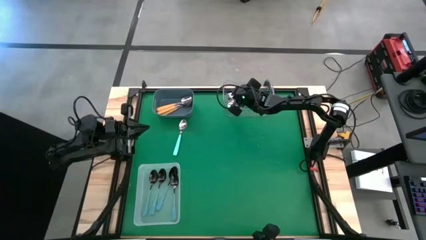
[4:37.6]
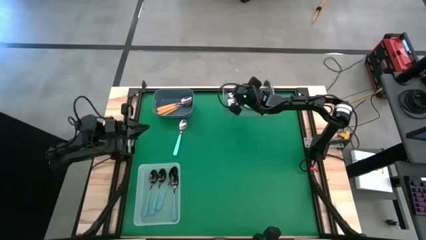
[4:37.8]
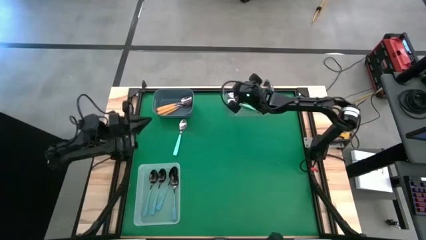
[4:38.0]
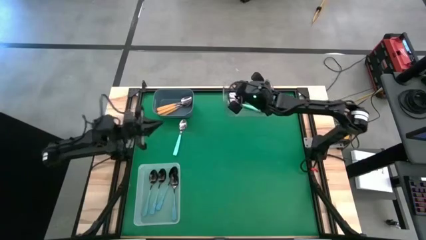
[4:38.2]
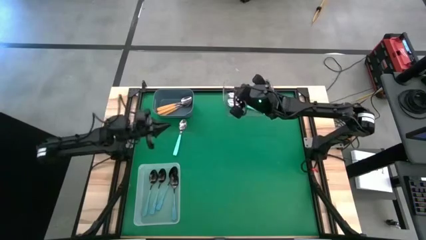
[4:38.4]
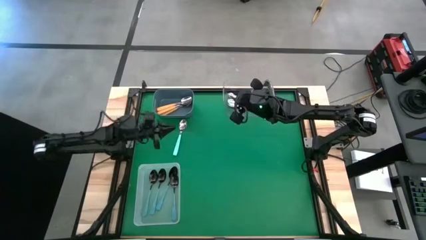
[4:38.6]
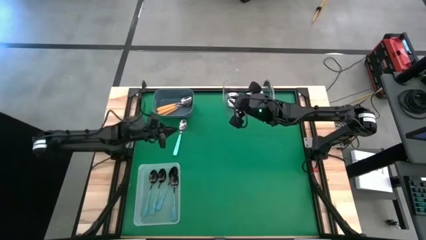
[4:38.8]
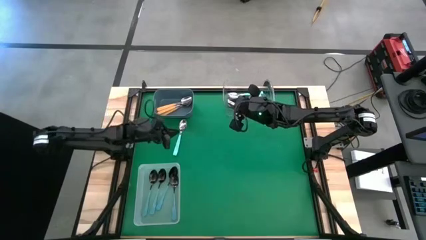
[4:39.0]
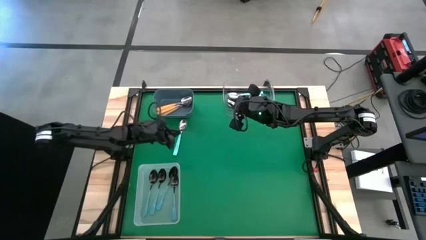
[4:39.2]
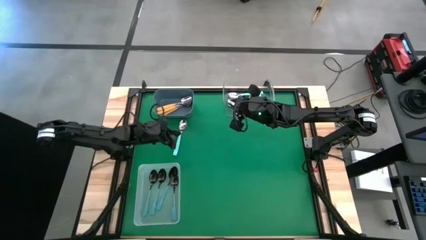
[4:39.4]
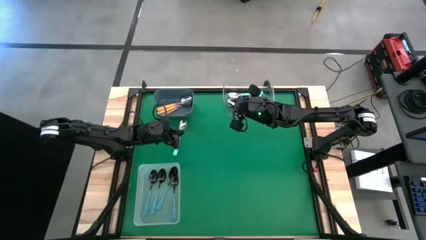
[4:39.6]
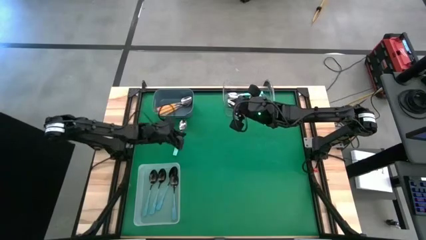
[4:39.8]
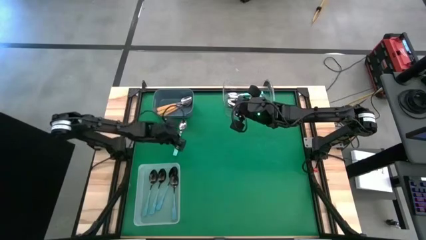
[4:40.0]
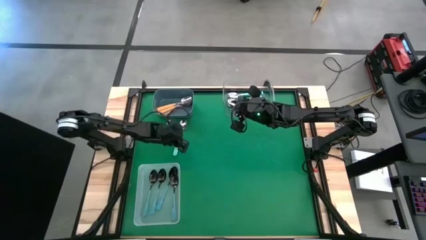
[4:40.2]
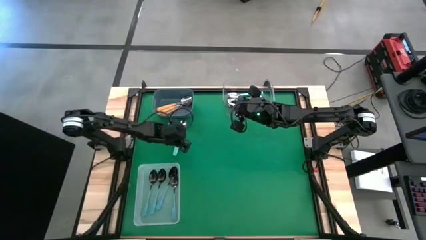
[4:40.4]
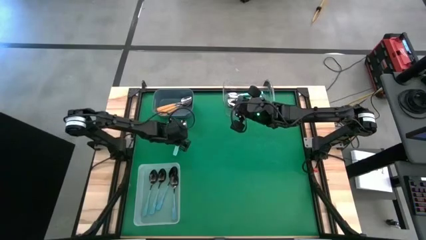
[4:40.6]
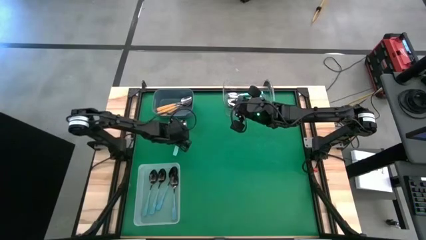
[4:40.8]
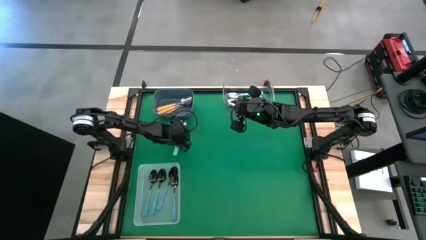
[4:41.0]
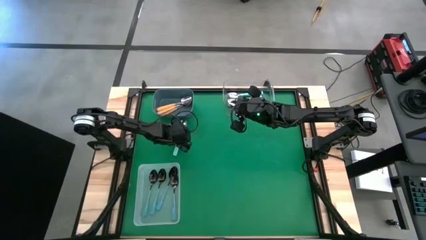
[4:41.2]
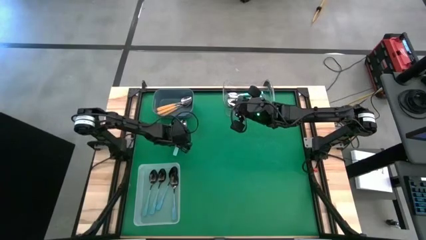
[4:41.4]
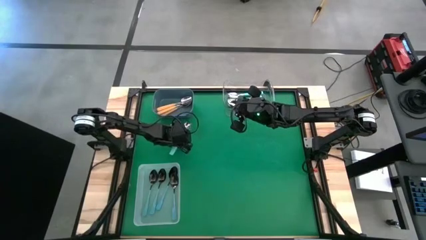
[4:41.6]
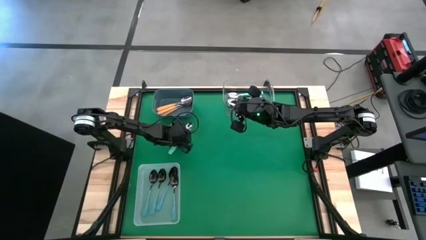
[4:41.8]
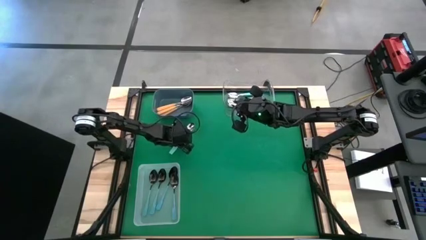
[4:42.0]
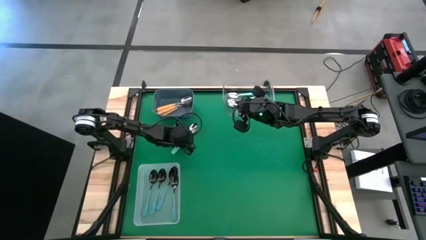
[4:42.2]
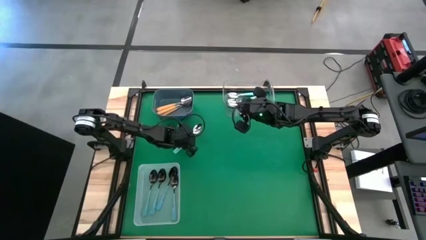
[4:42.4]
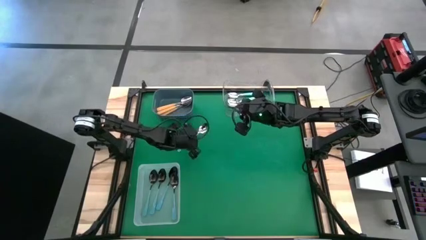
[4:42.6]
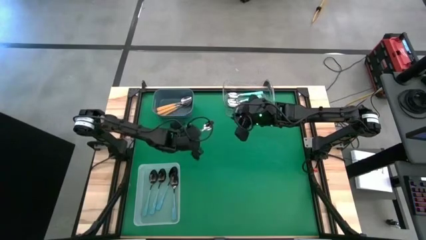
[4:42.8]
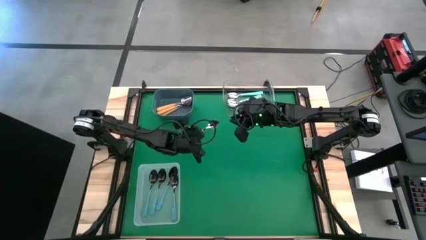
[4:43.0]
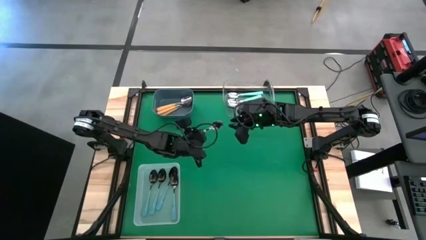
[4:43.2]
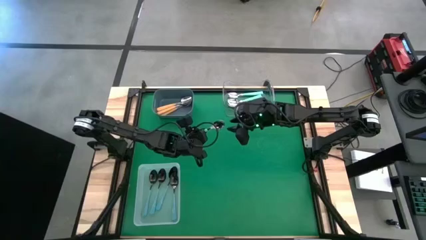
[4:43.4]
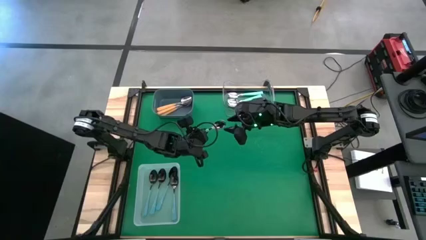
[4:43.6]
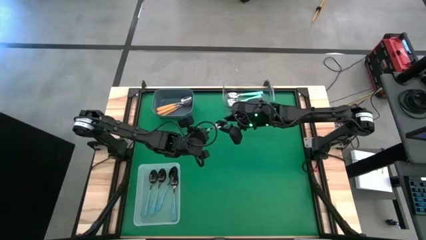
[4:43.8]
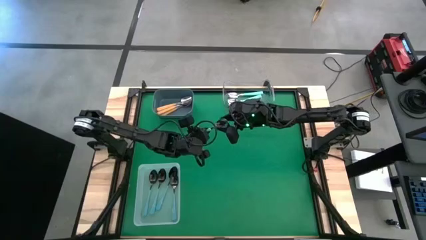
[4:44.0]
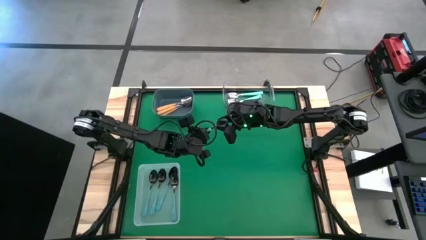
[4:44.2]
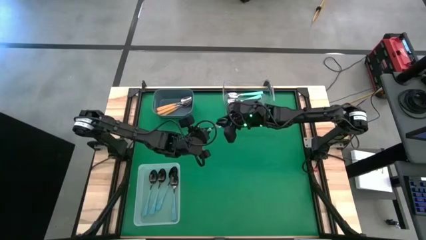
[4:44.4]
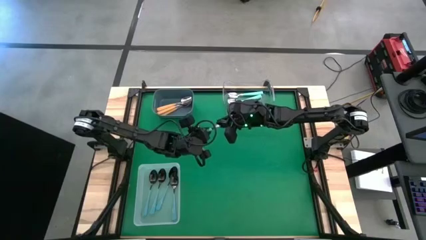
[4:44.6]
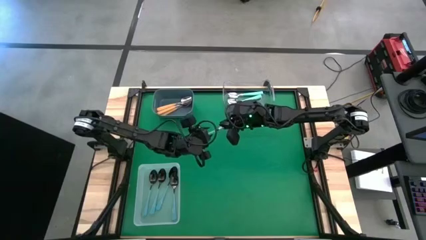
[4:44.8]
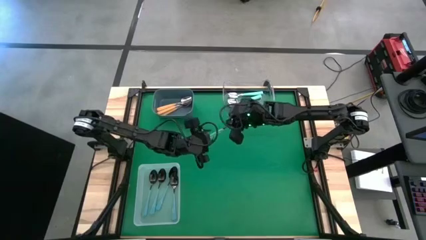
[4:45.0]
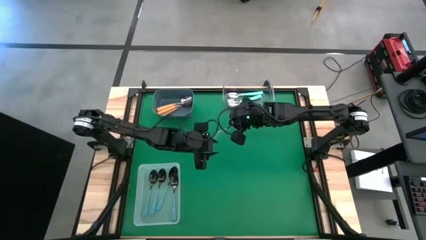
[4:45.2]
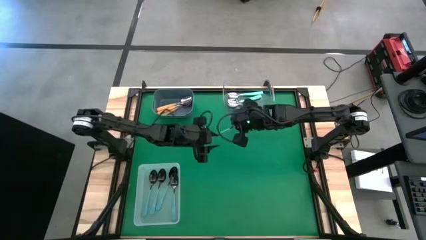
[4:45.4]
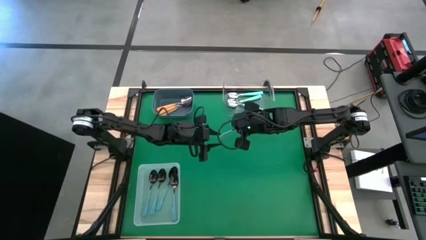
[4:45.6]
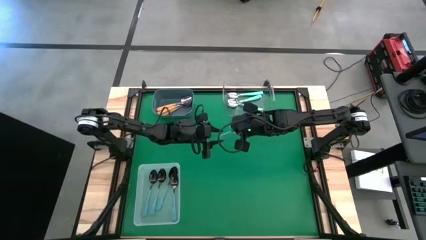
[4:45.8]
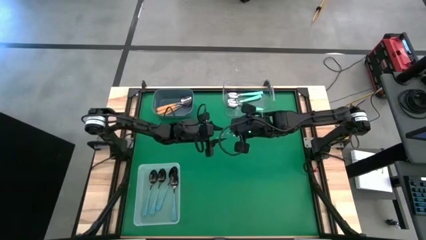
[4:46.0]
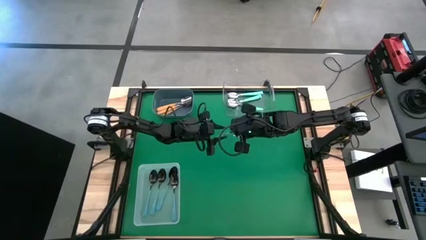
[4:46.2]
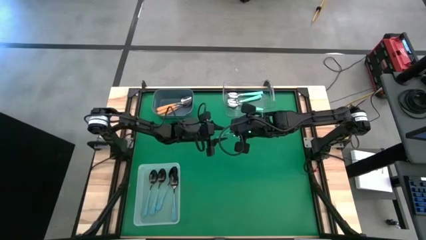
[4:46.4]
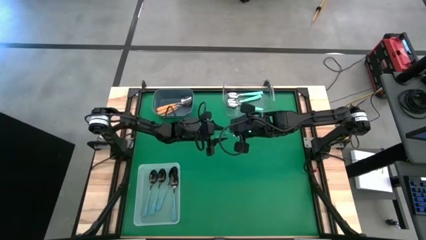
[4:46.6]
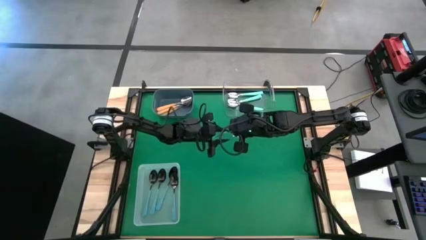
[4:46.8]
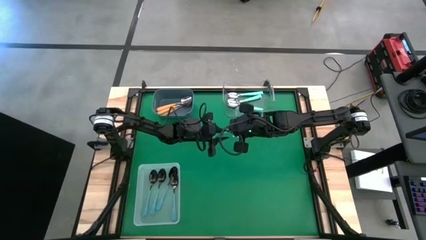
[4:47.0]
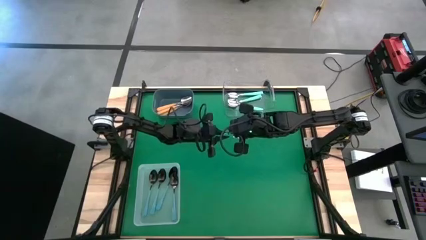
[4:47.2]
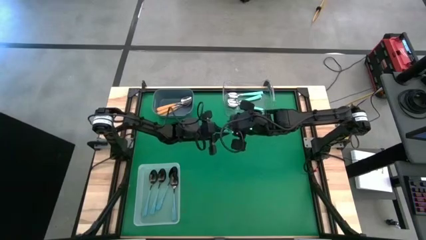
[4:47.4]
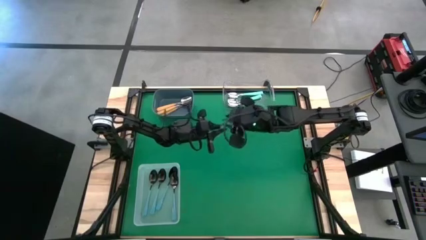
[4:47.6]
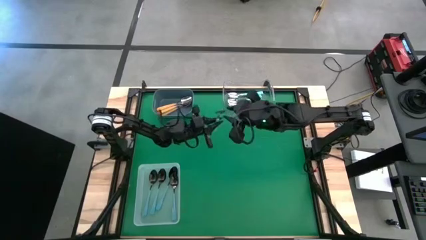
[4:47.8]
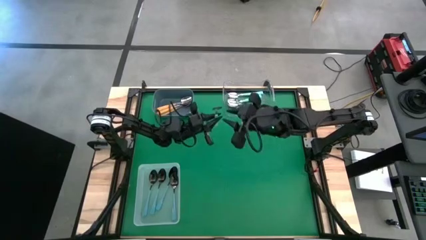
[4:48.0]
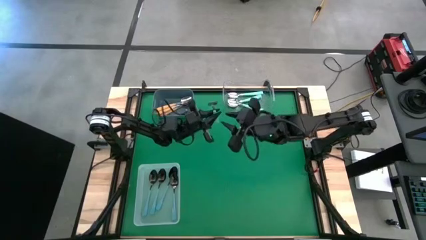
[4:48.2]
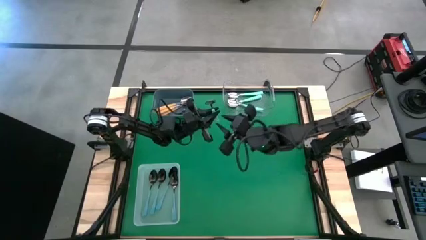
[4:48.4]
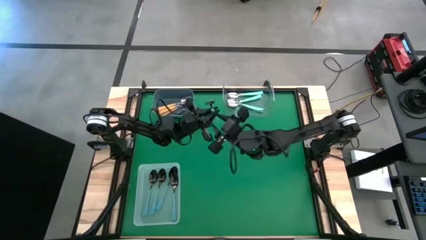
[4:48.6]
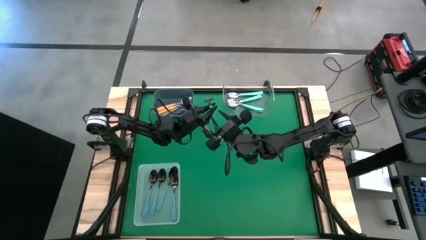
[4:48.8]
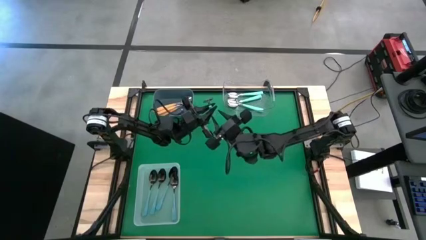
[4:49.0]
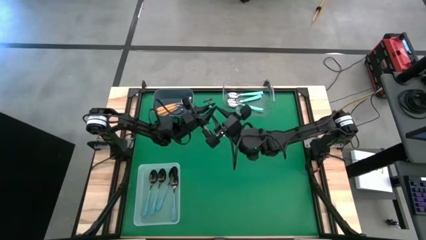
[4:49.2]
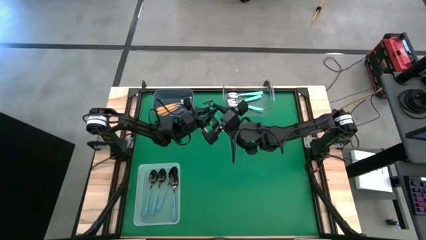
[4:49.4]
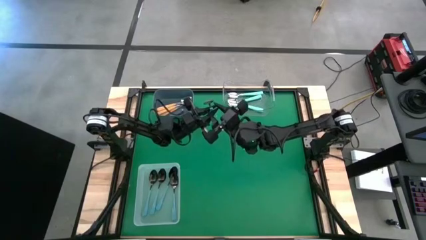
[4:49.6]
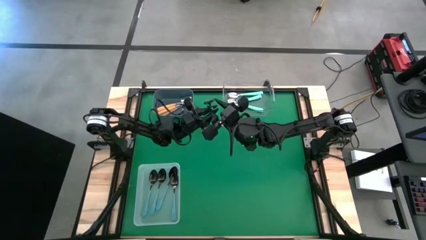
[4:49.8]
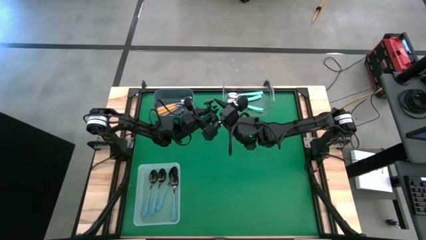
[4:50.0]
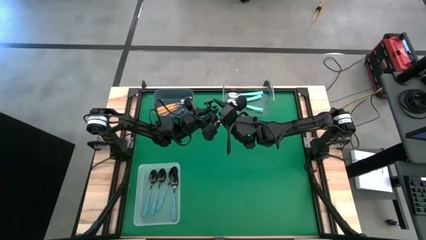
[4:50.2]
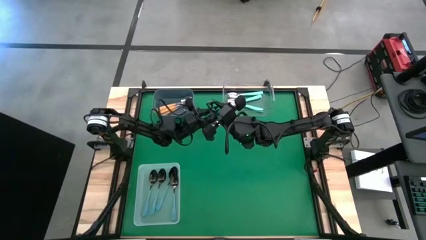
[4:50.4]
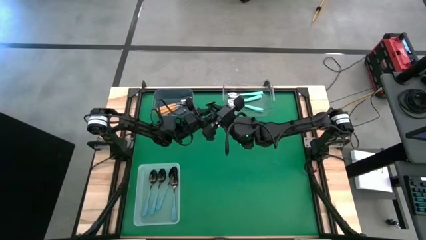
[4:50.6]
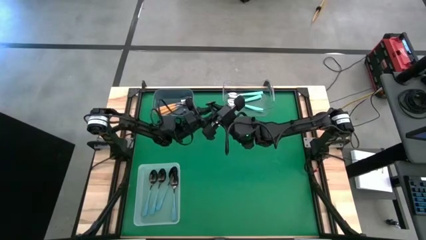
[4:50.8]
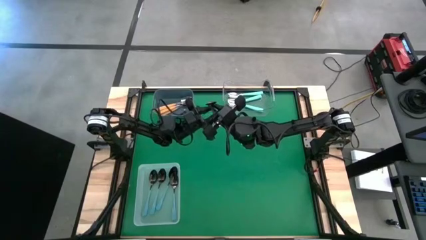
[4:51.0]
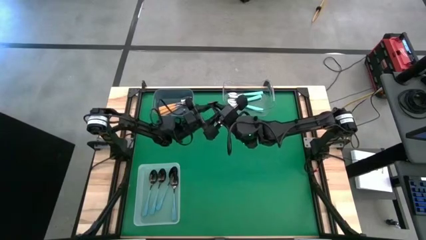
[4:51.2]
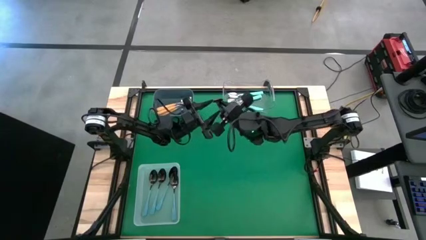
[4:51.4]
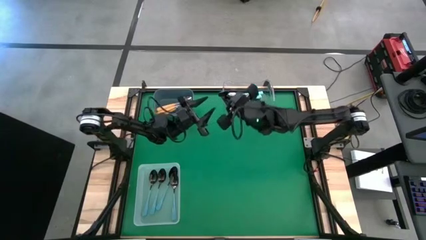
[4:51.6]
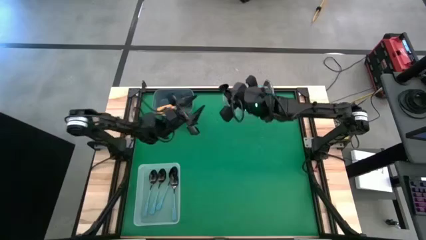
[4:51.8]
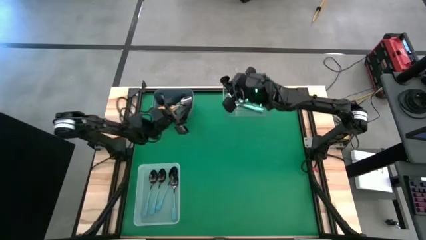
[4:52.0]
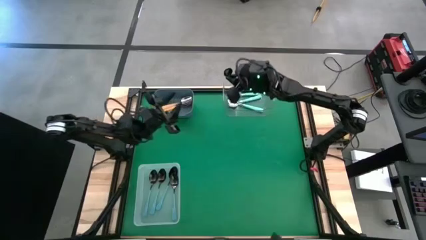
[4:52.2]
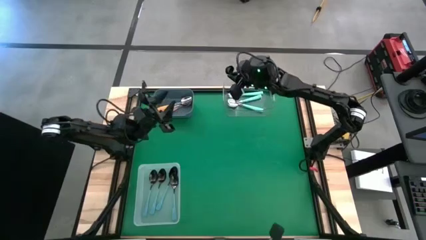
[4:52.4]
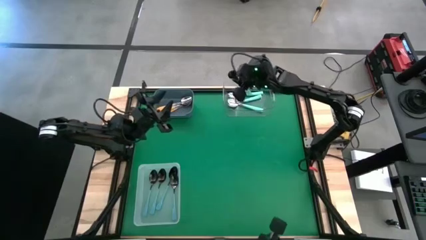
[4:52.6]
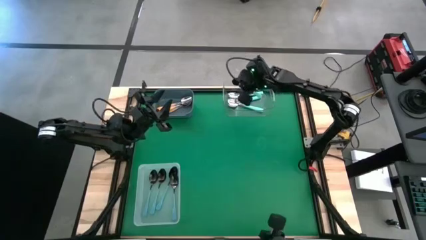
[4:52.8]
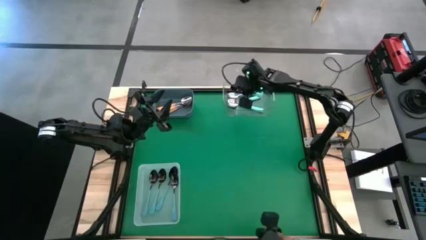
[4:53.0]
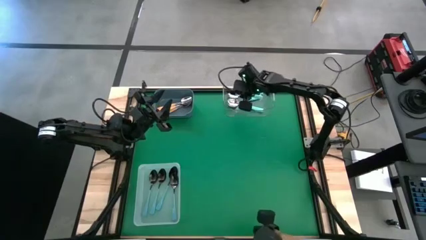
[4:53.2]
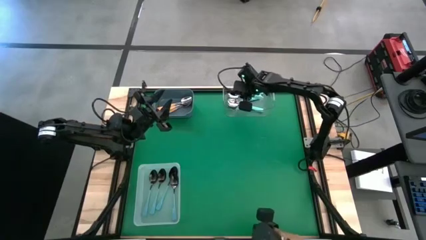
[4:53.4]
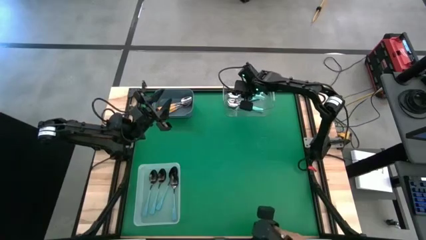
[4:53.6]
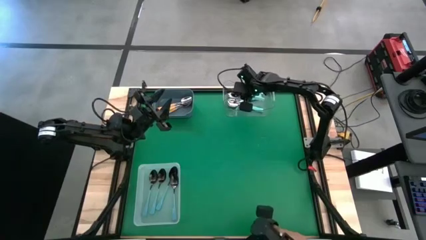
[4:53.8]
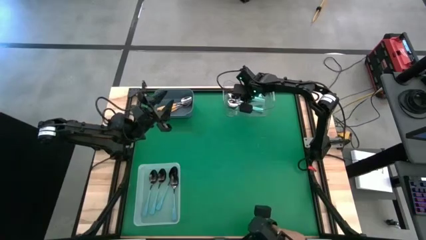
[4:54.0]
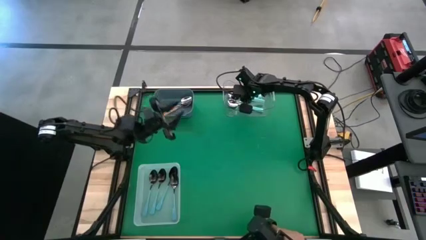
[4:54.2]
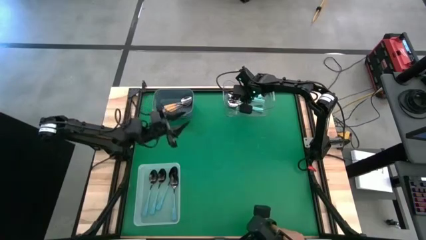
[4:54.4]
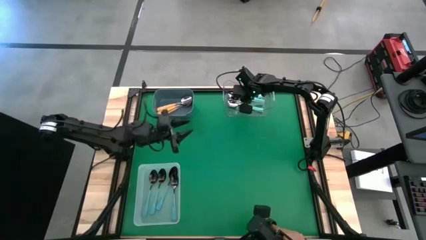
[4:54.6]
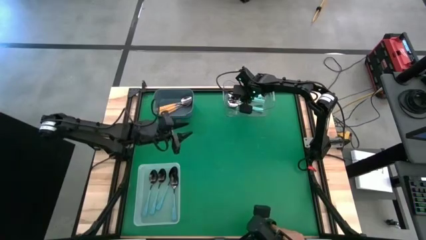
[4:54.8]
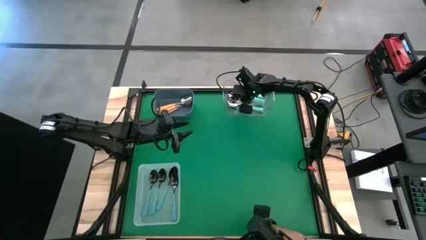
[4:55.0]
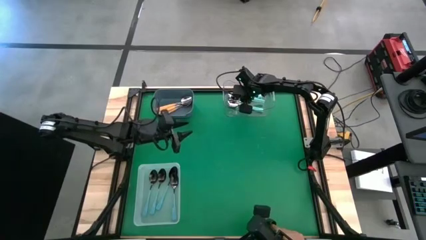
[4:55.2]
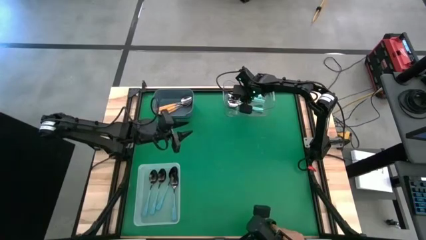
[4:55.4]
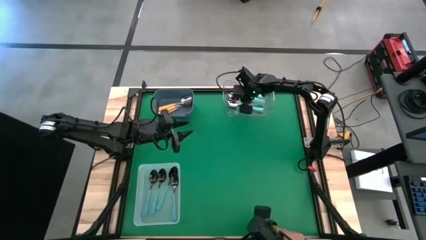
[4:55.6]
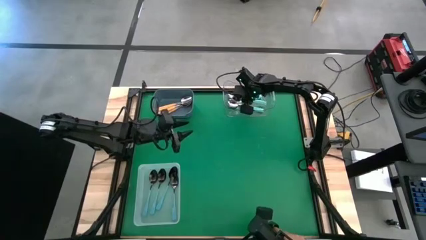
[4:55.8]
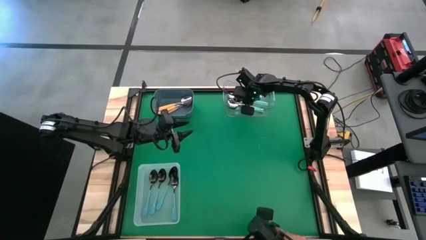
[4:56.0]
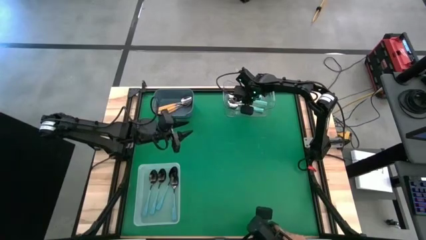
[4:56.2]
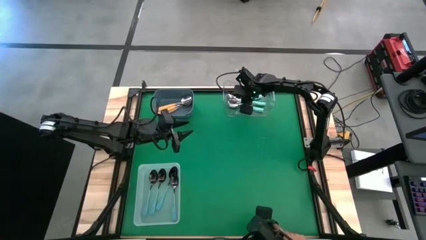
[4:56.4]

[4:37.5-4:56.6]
Task: Sort silverware by color (type)
Put the light blue spoon into the transparent bin
